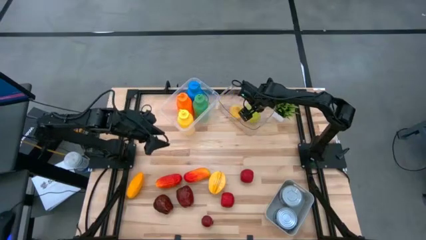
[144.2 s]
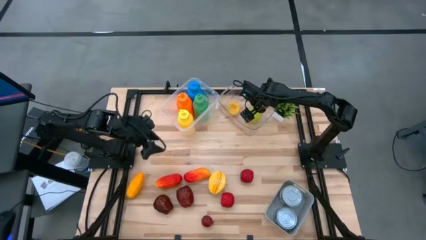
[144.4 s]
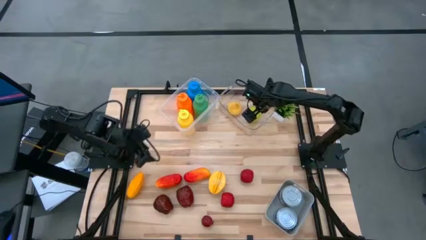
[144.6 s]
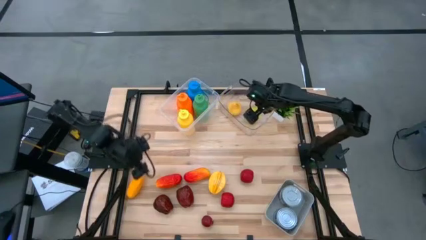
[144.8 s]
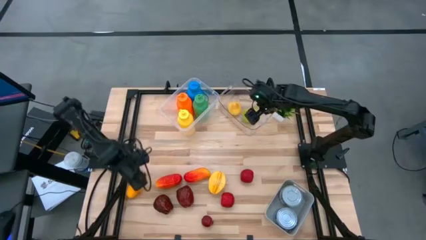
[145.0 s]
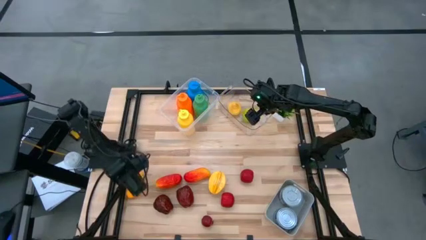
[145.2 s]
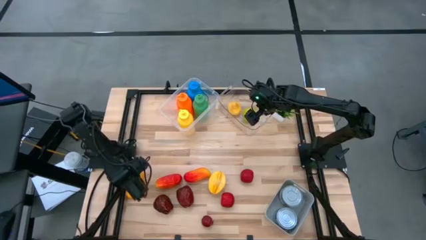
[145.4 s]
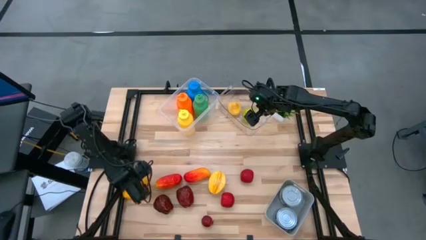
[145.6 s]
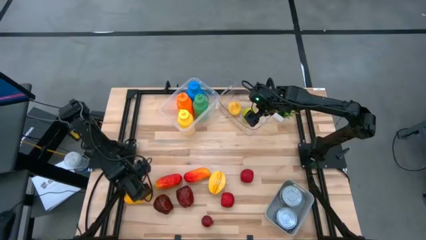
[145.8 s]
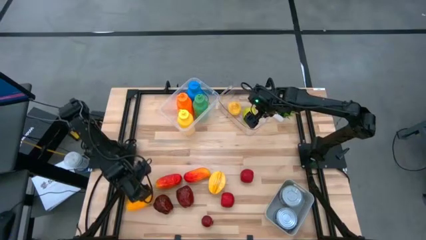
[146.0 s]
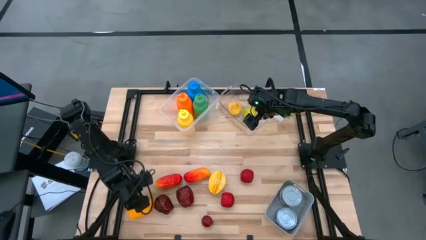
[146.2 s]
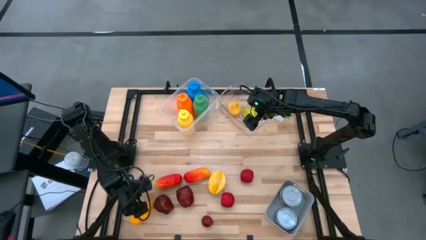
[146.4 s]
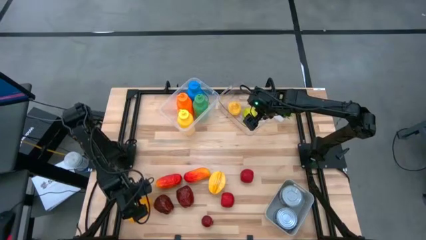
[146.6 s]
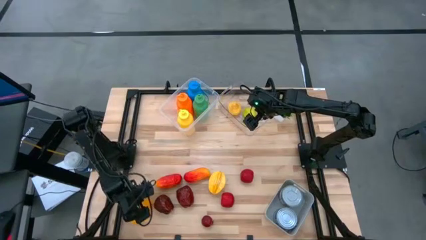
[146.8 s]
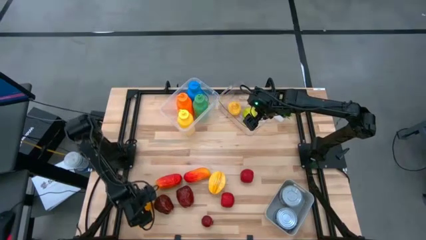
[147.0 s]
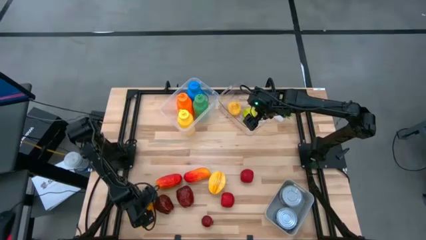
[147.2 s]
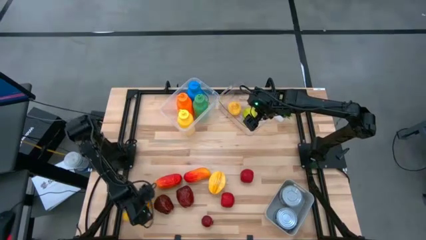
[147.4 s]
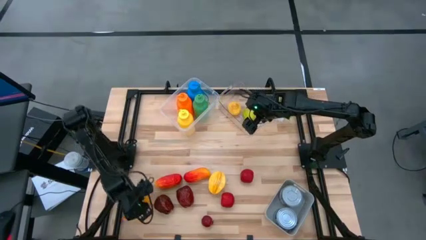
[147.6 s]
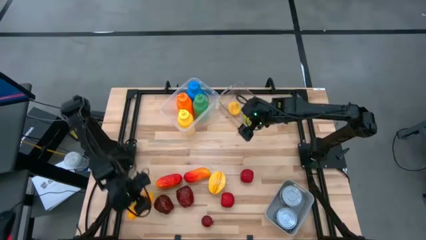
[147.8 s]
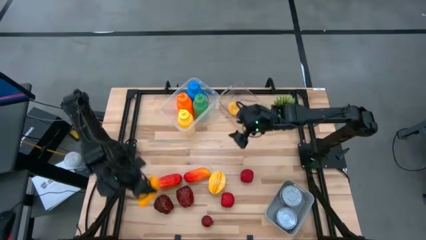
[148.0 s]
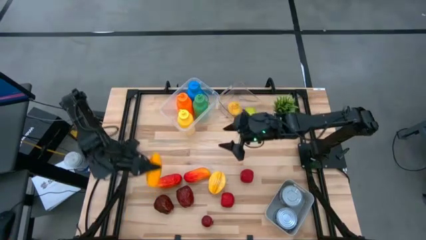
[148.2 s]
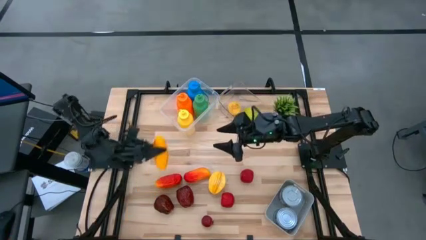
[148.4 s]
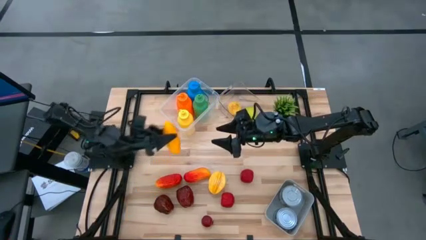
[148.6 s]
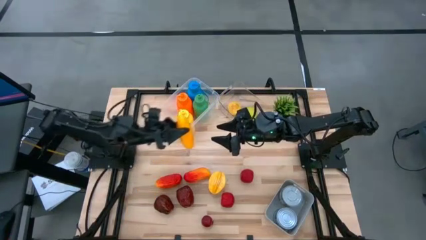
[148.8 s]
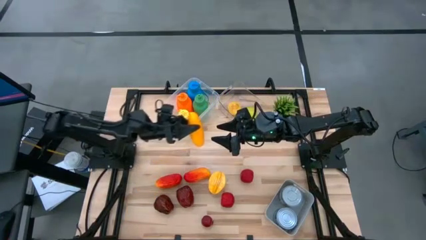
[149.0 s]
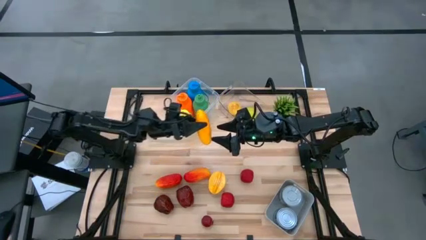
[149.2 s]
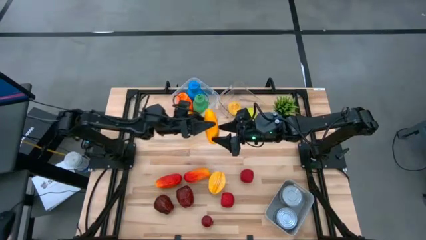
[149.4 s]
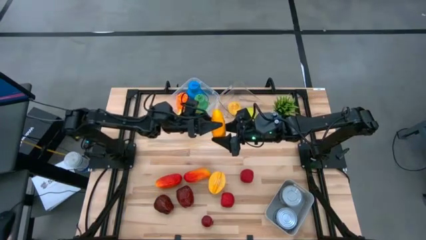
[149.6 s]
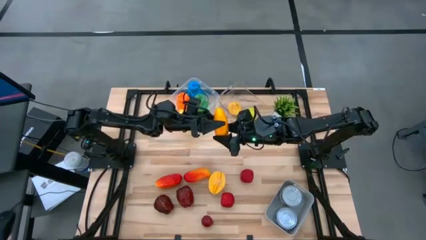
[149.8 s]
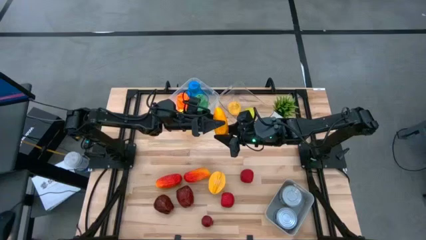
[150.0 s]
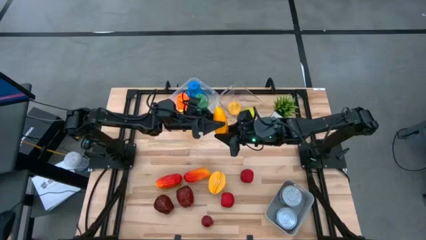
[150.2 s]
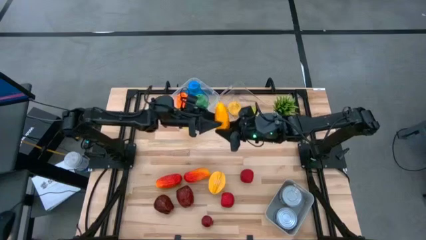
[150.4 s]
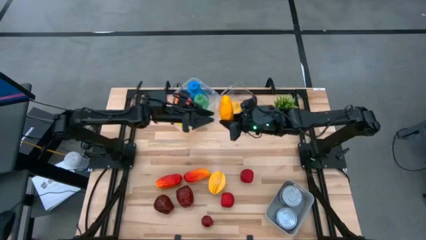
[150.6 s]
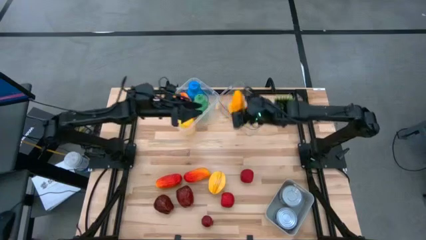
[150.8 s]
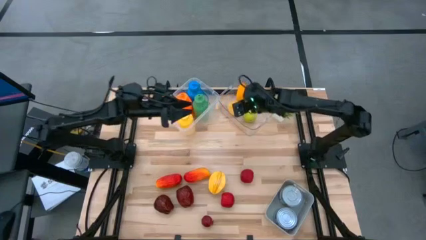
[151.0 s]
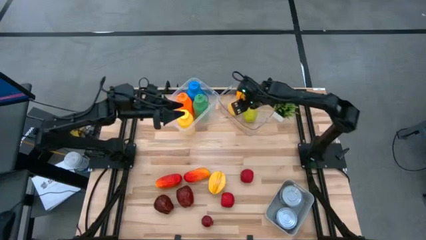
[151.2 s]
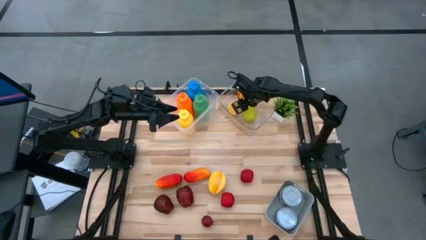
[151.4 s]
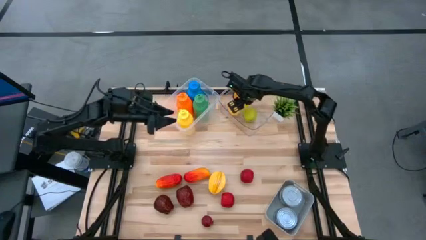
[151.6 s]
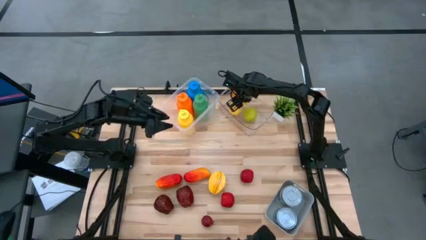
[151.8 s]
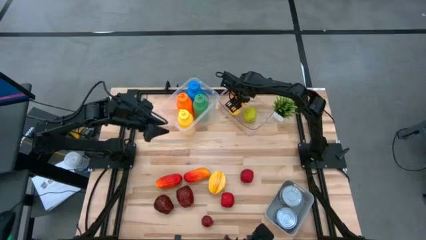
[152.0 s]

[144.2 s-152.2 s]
Task: Pick & Place Food Item
Put the yellow mango into the right transparent bin

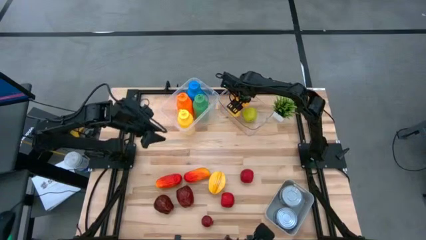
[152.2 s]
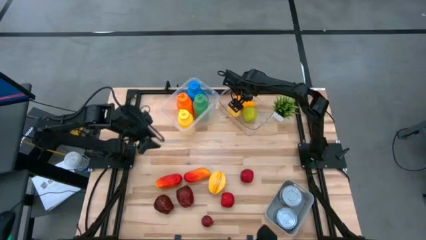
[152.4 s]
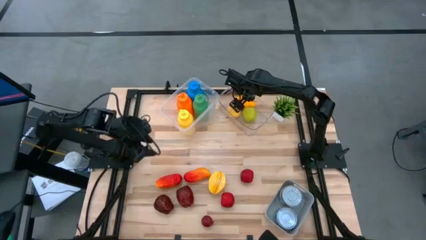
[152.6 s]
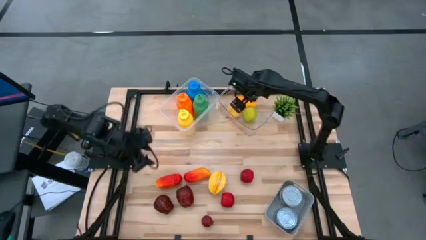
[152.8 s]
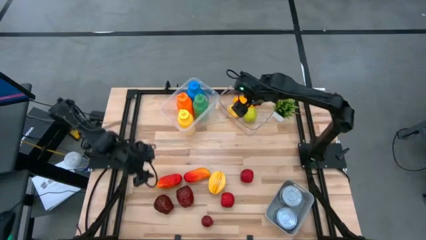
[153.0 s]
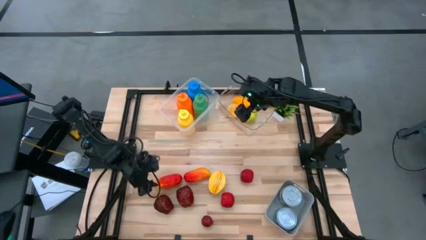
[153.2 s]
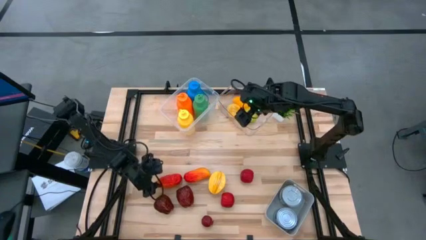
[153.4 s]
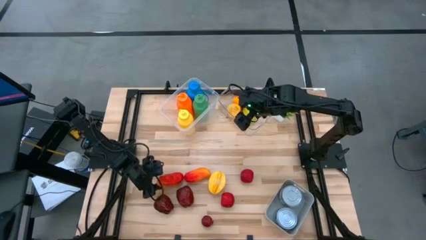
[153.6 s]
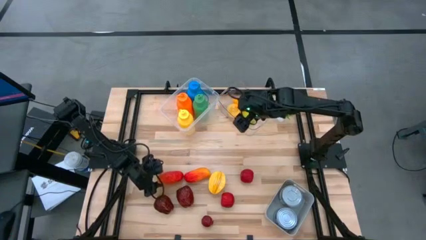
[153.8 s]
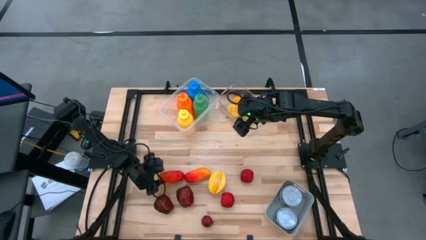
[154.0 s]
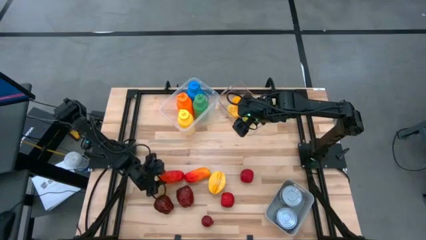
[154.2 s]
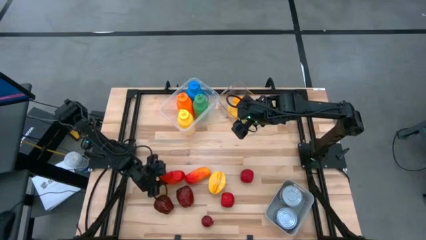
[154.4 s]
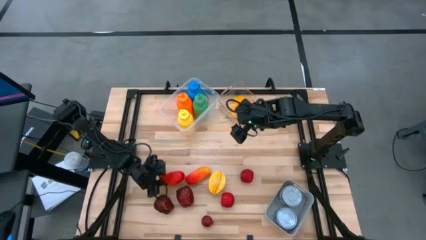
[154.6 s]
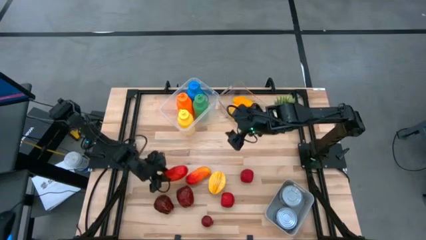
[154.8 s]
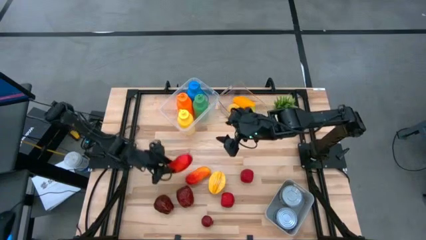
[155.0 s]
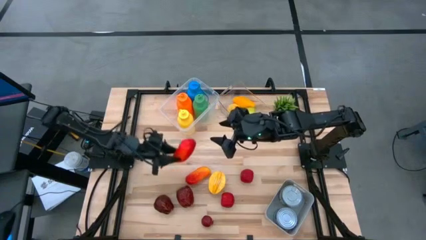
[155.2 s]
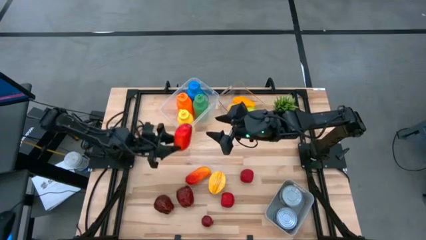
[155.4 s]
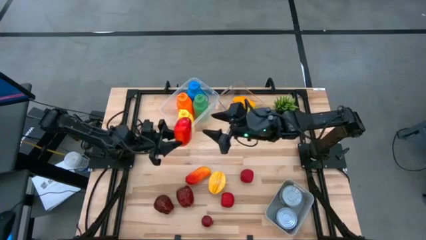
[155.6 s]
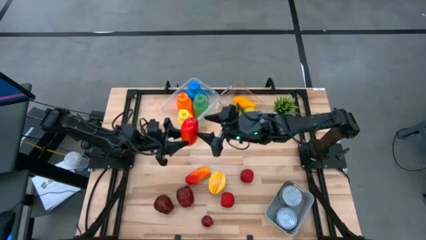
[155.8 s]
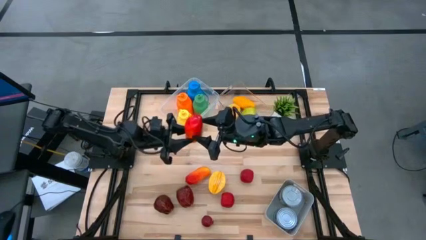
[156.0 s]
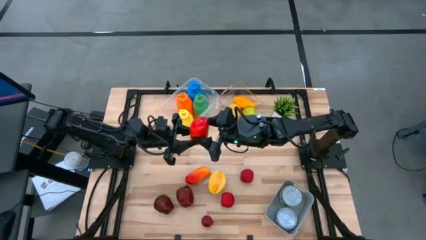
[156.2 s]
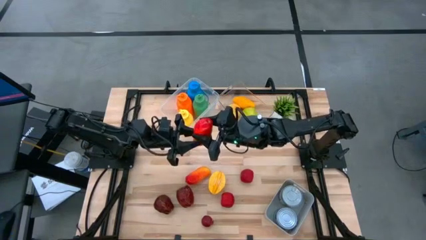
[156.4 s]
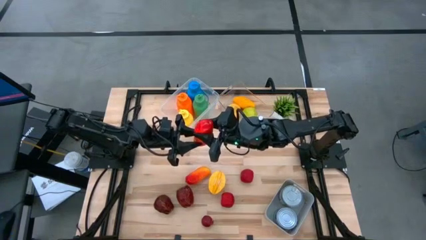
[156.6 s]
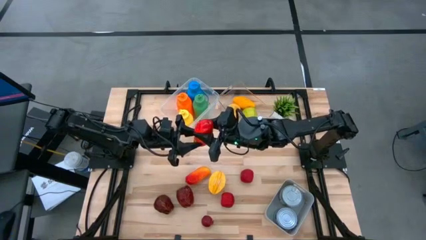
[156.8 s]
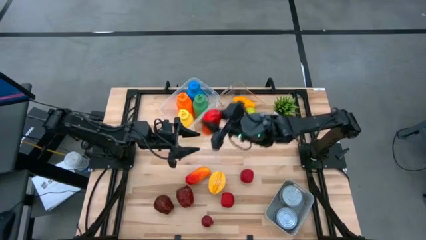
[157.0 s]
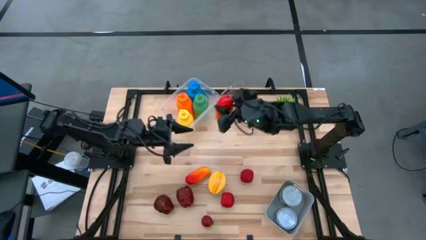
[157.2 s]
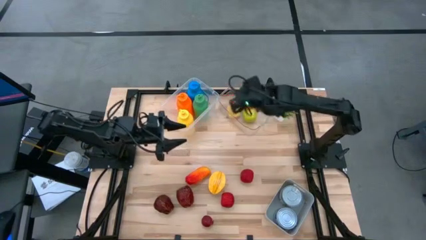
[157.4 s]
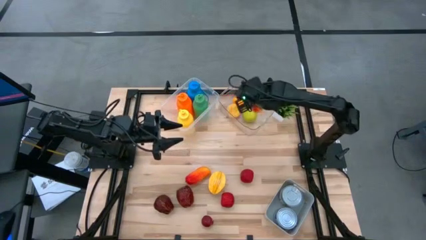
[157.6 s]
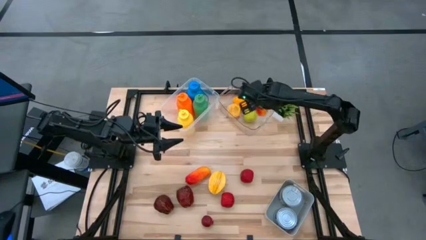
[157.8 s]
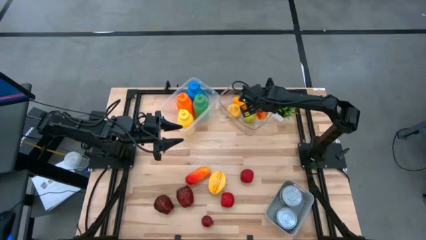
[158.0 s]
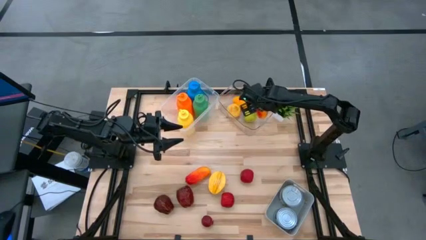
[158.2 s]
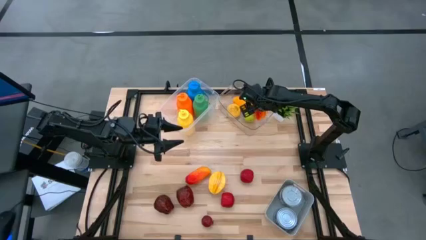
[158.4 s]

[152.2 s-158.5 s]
Put the left orange mango into the right transparent bin

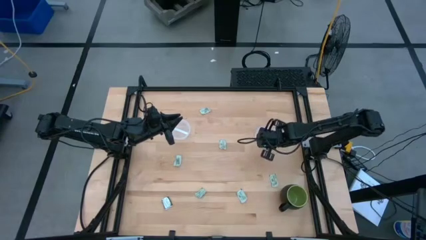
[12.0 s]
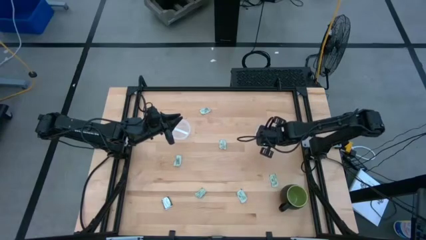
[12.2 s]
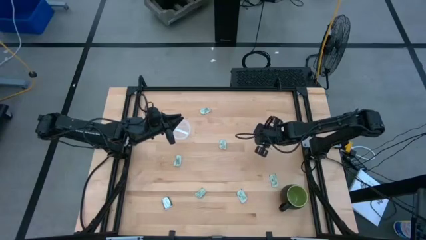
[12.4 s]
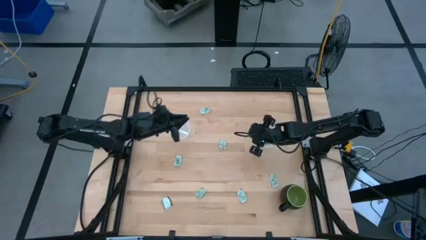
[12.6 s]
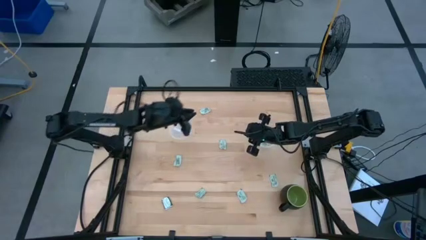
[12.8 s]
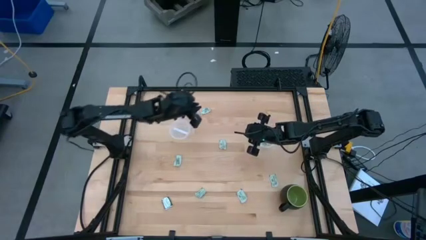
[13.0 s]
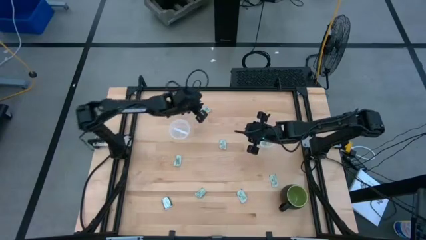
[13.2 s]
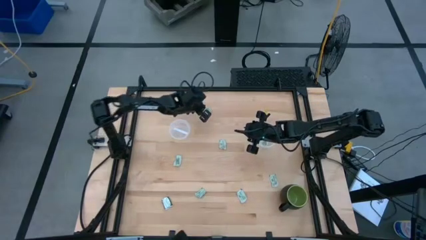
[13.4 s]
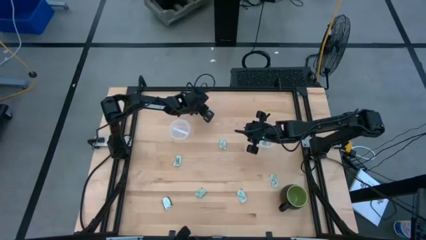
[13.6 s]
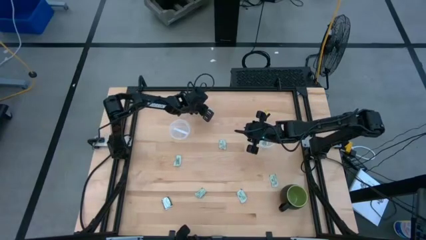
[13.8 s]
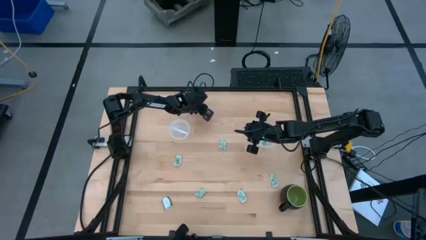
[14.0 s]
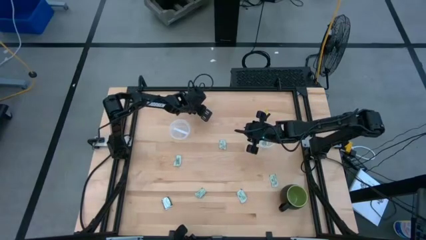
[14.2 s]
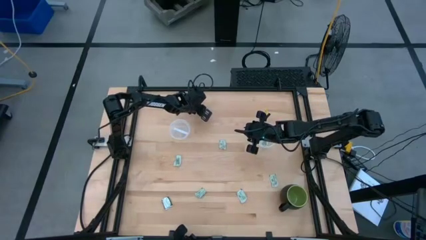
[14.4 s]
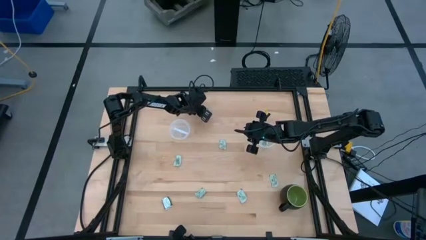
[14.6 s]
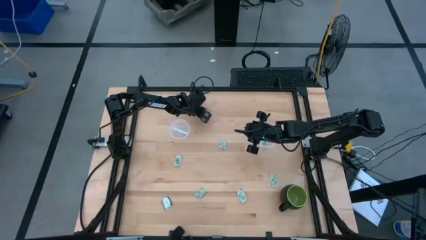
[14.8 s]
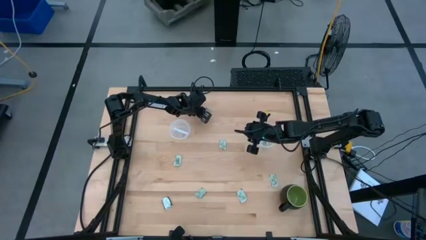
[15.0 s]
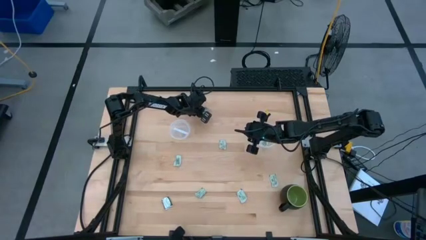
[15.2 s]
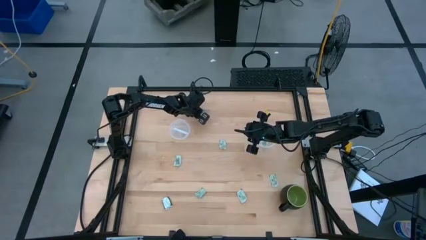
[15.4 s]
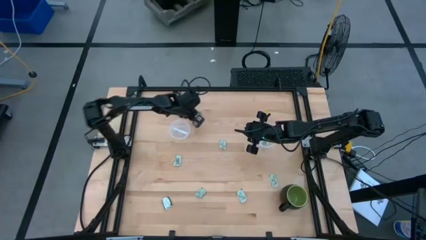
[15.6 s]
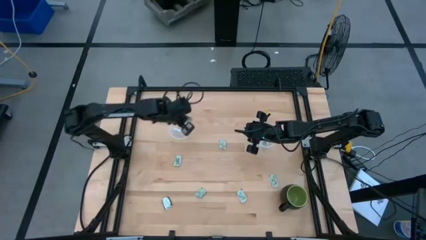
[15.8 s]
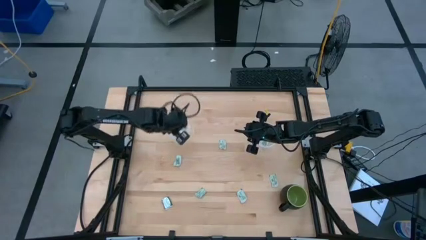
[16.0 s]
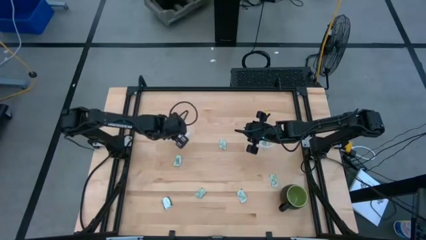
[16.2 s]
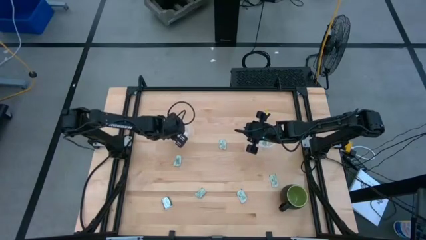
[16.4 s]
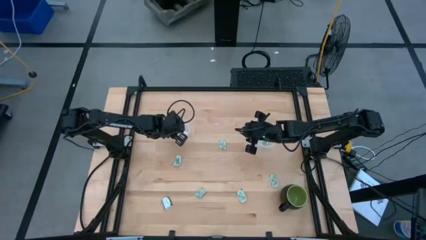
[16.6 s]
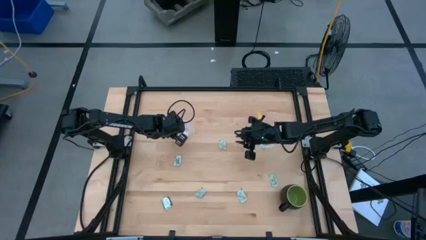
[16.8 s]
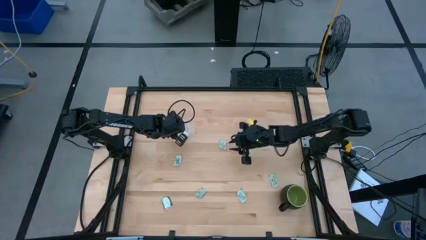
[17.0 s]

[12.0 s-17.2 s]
Task: Pick and place Stevia / Truvia into bins
Put the stevia packet into the left transparent container
